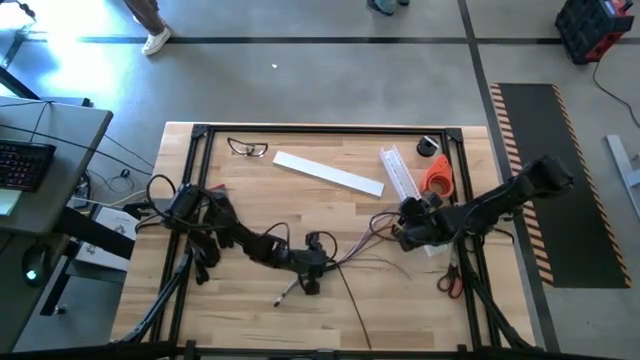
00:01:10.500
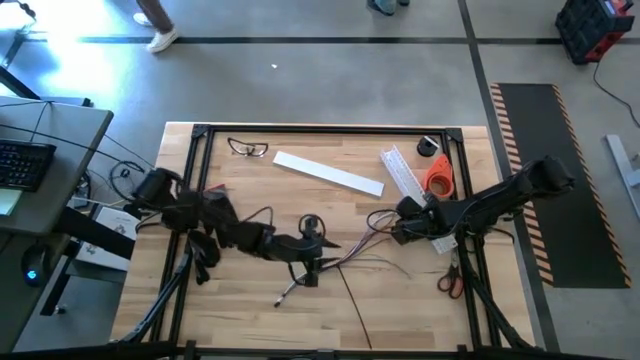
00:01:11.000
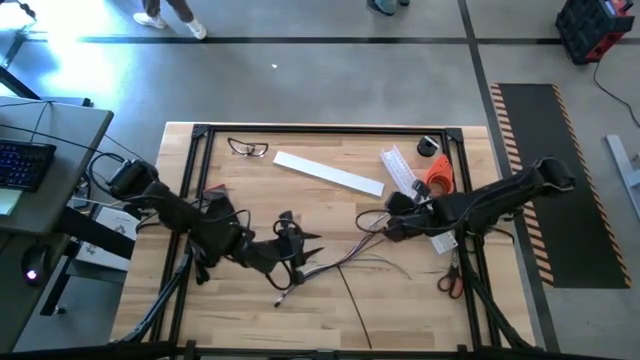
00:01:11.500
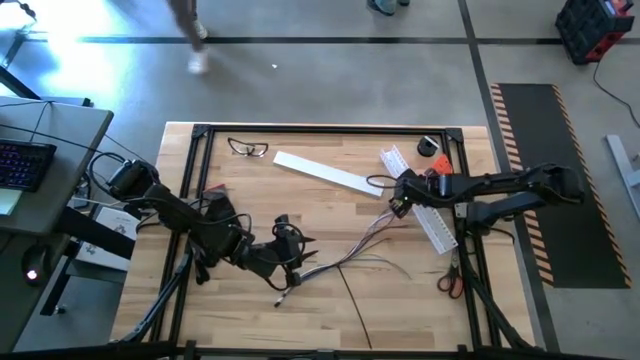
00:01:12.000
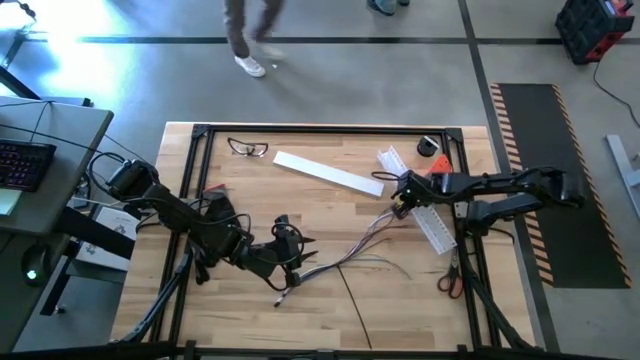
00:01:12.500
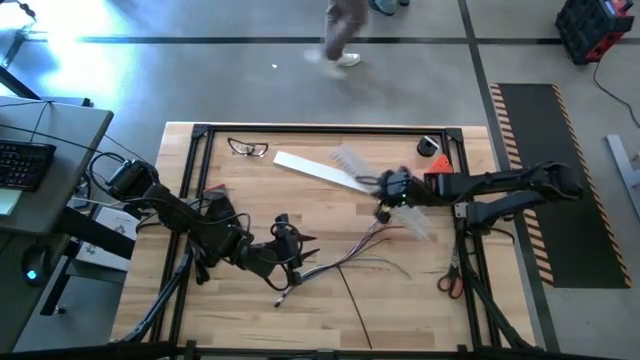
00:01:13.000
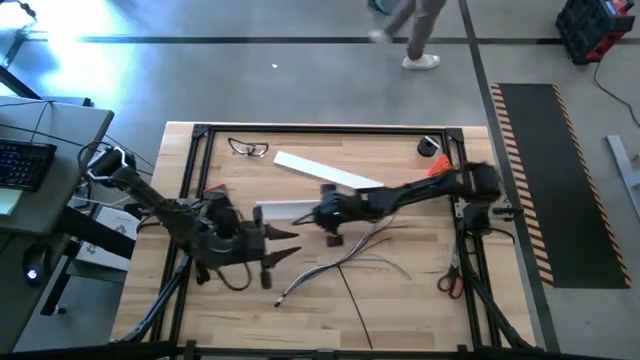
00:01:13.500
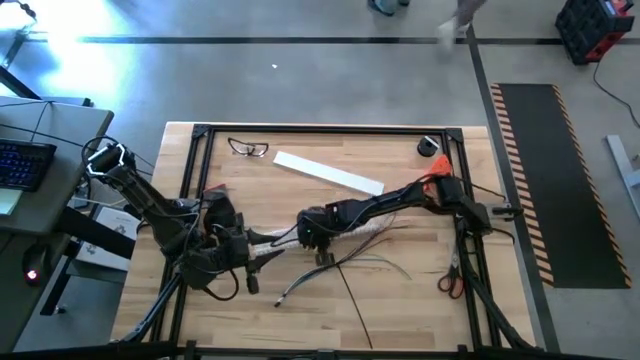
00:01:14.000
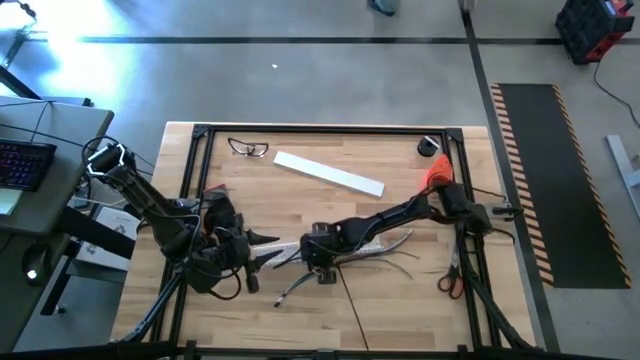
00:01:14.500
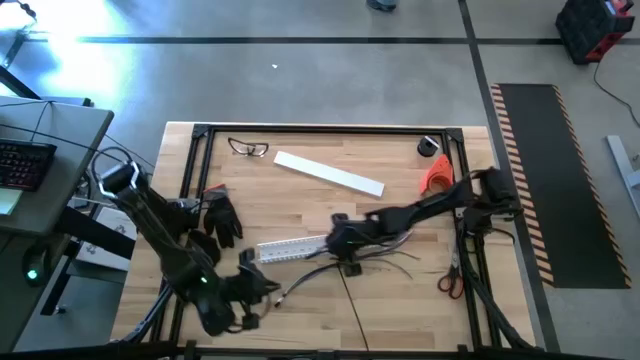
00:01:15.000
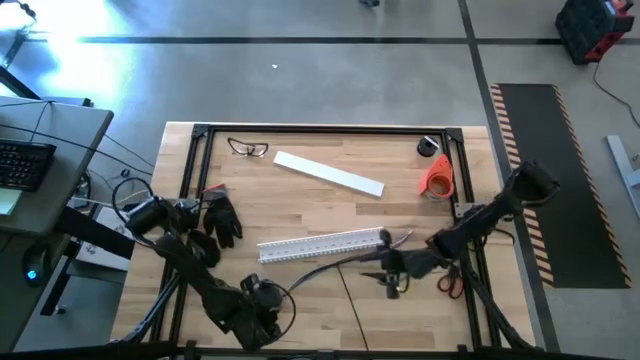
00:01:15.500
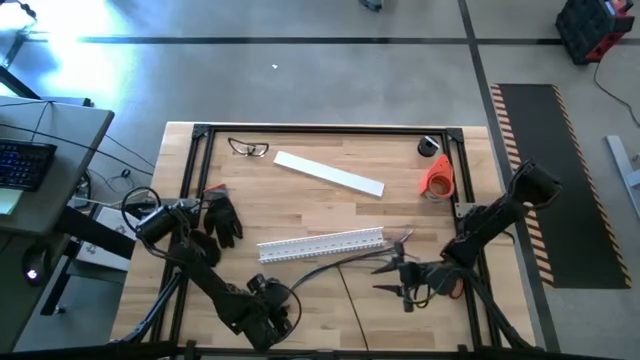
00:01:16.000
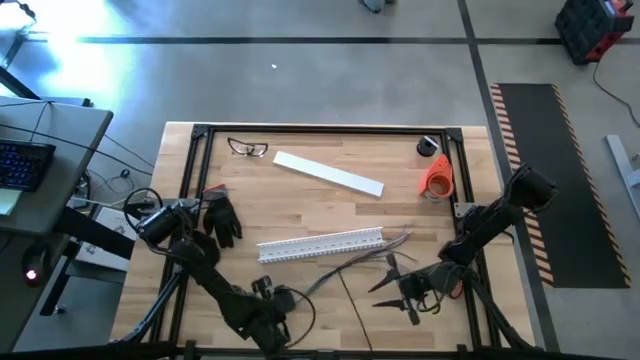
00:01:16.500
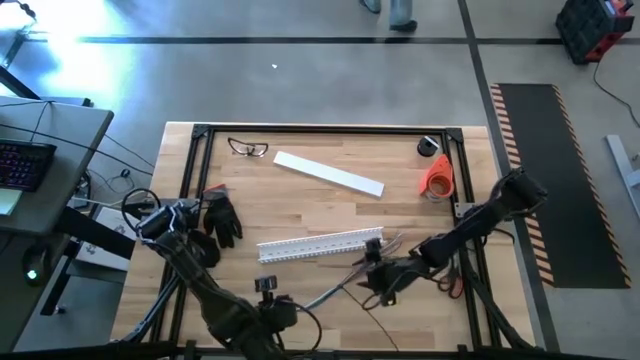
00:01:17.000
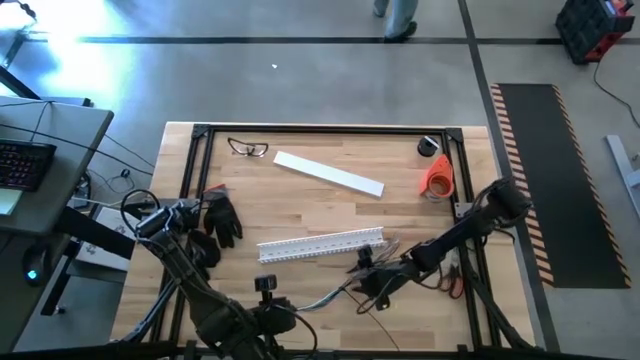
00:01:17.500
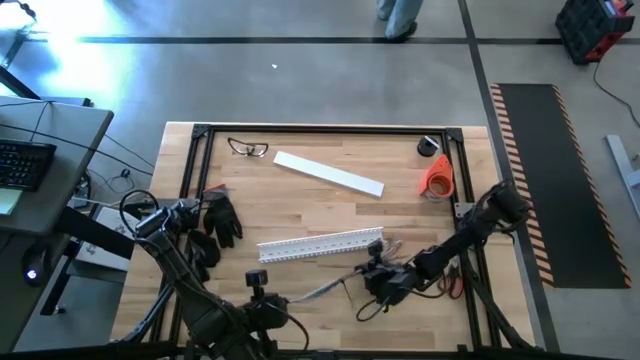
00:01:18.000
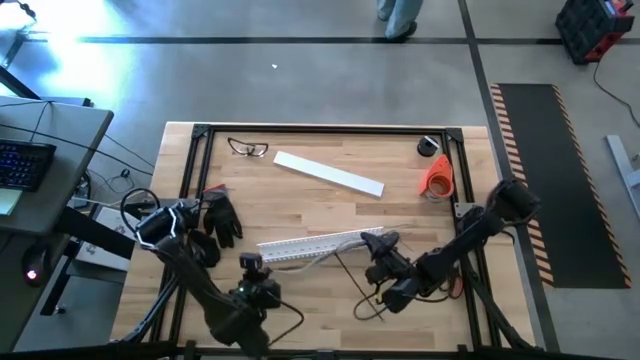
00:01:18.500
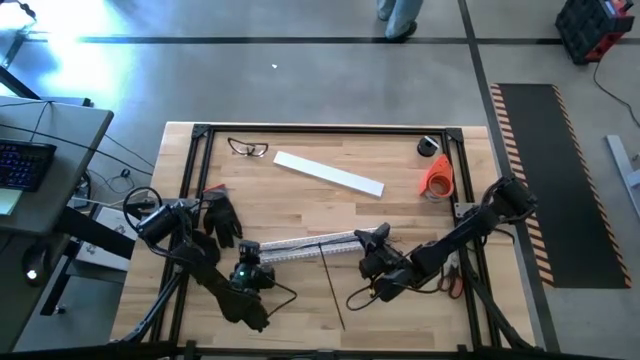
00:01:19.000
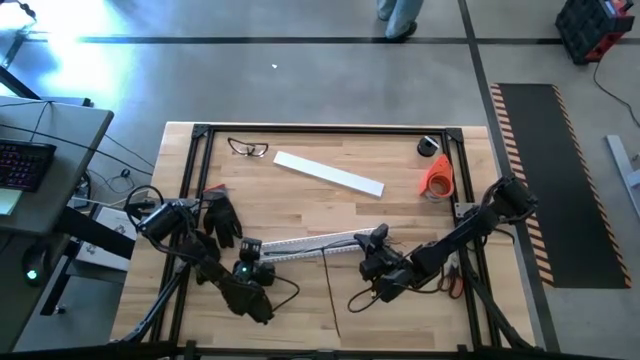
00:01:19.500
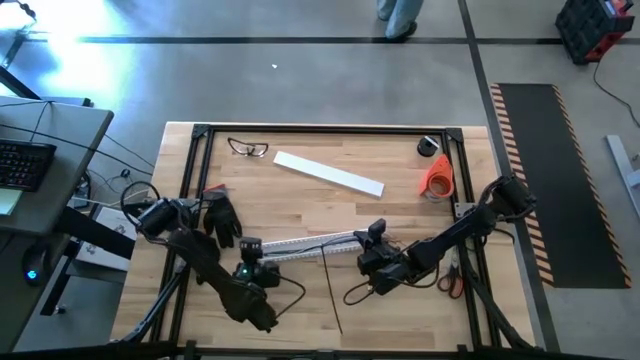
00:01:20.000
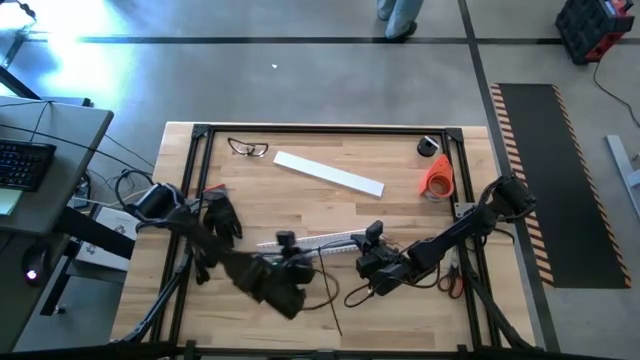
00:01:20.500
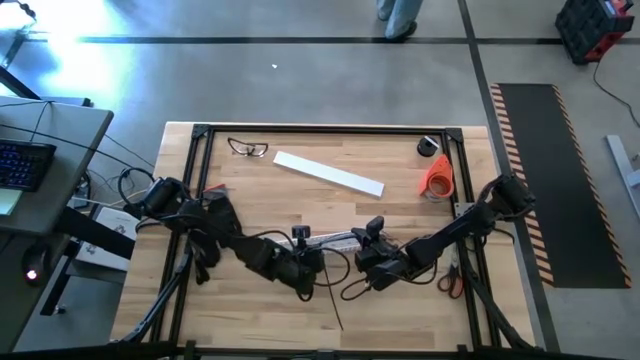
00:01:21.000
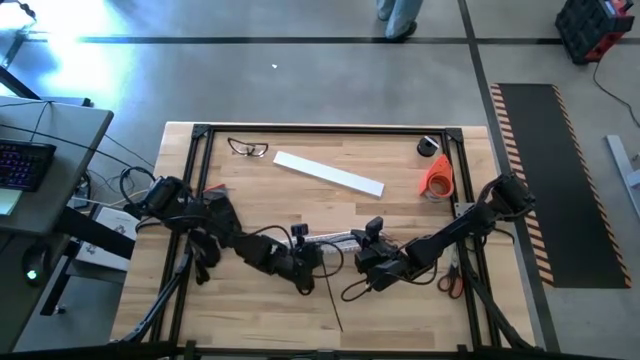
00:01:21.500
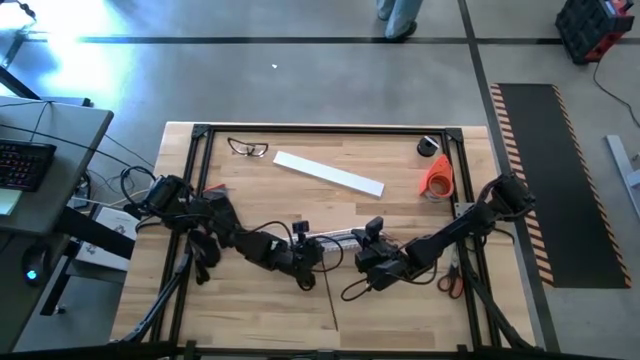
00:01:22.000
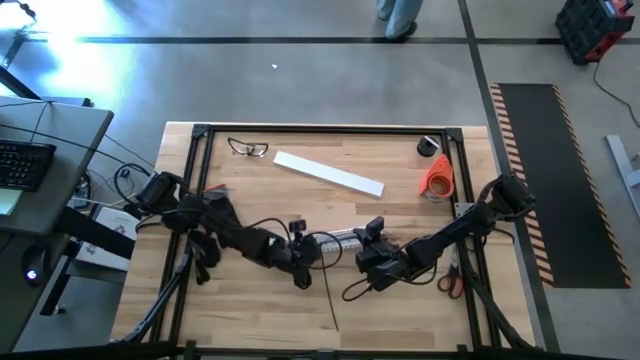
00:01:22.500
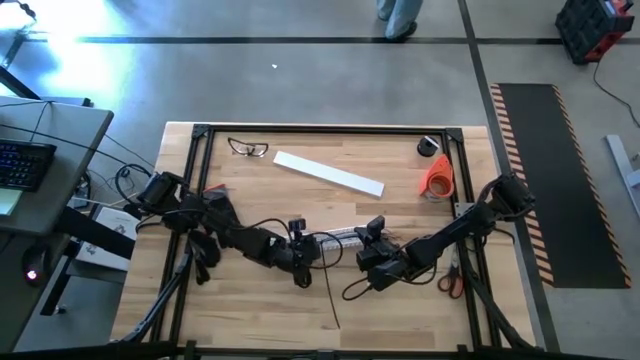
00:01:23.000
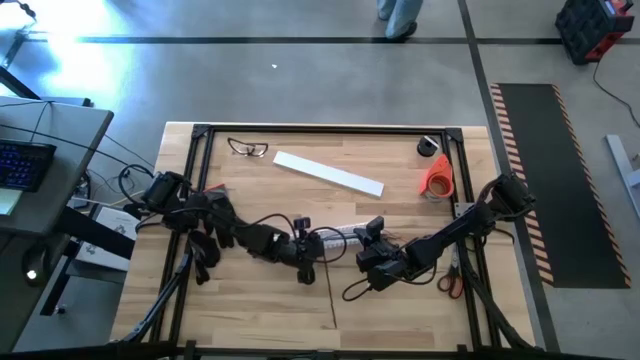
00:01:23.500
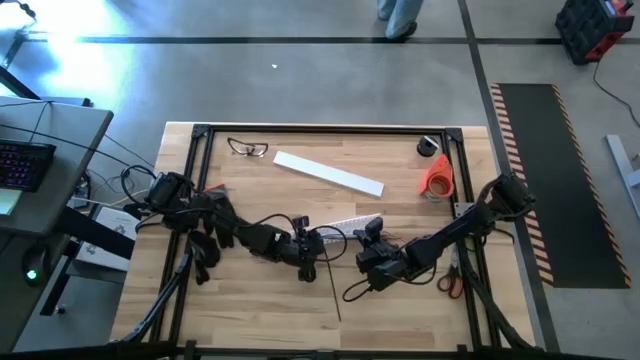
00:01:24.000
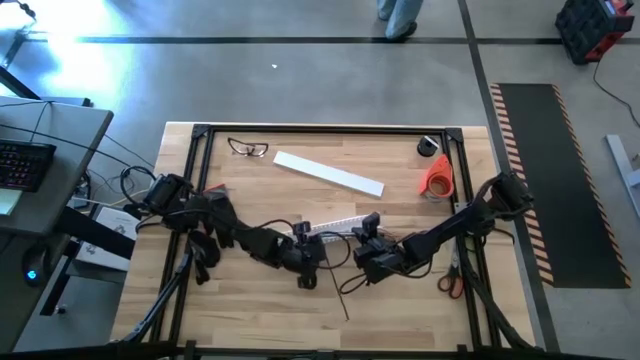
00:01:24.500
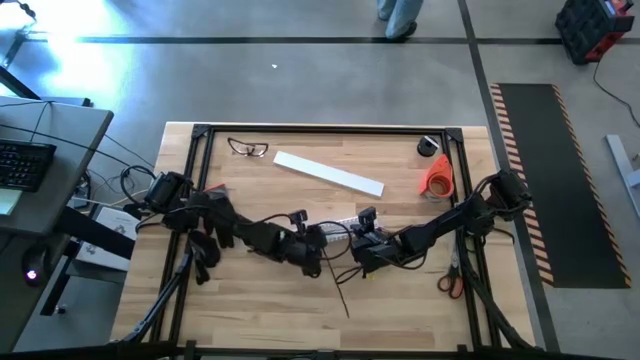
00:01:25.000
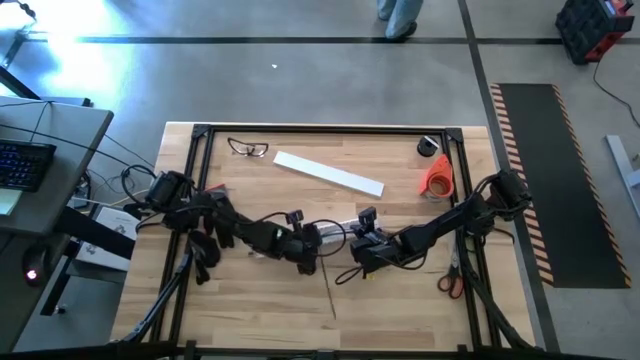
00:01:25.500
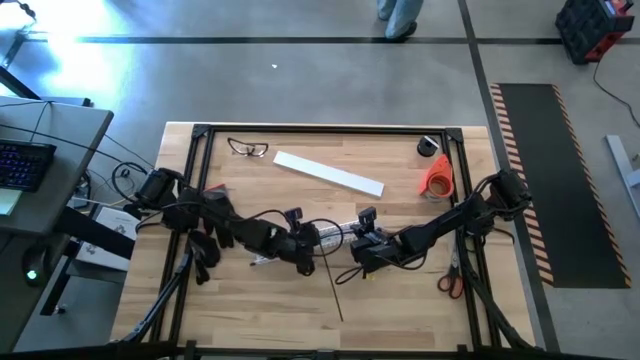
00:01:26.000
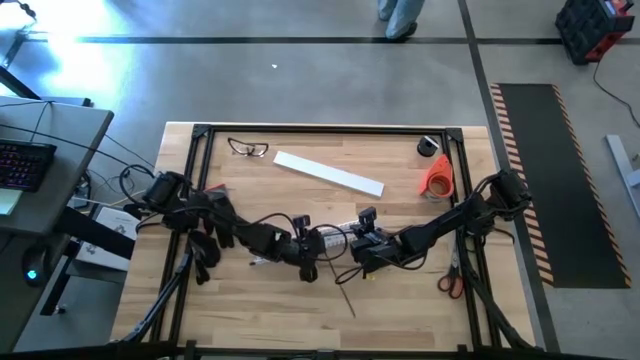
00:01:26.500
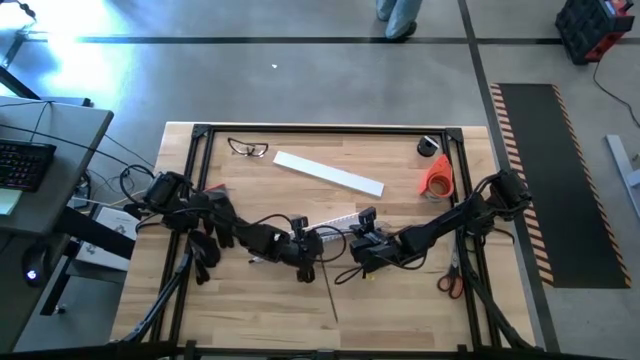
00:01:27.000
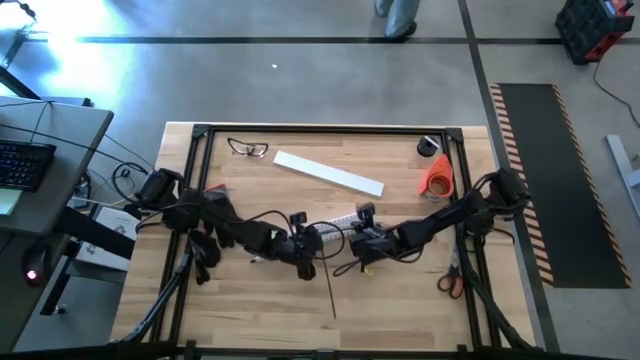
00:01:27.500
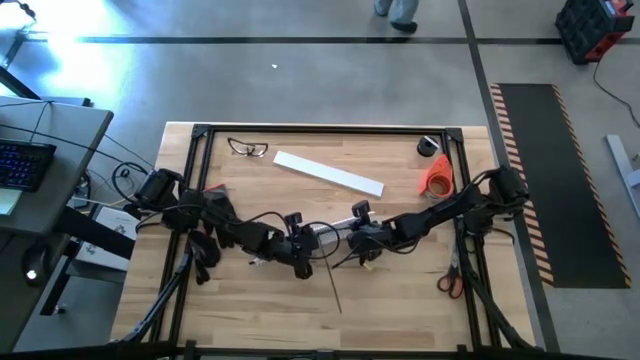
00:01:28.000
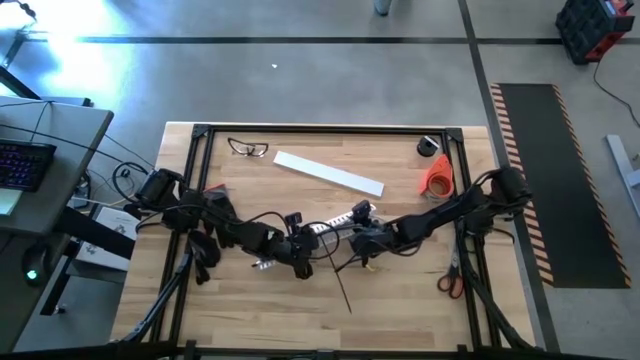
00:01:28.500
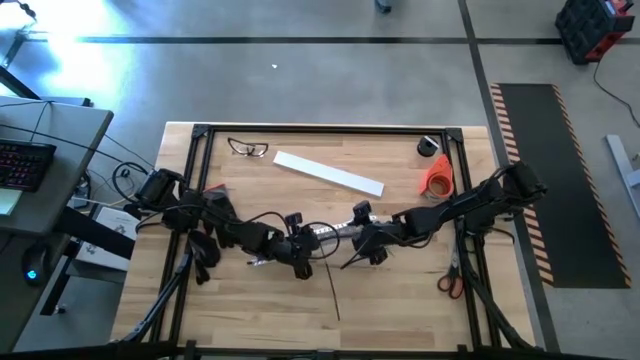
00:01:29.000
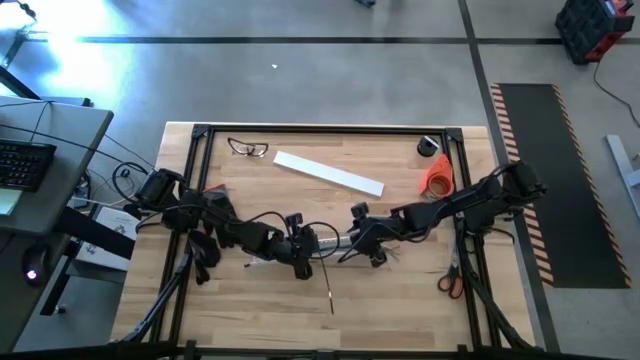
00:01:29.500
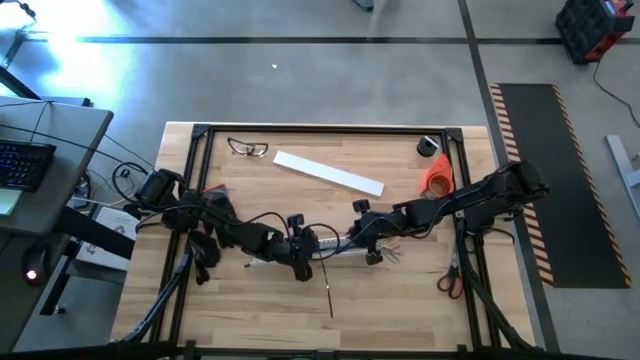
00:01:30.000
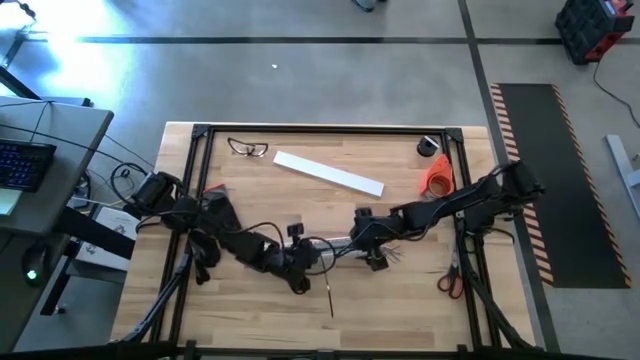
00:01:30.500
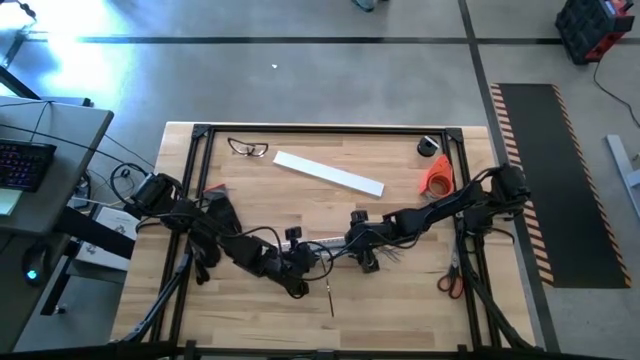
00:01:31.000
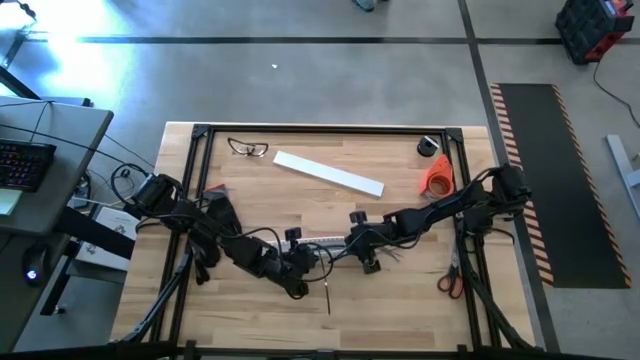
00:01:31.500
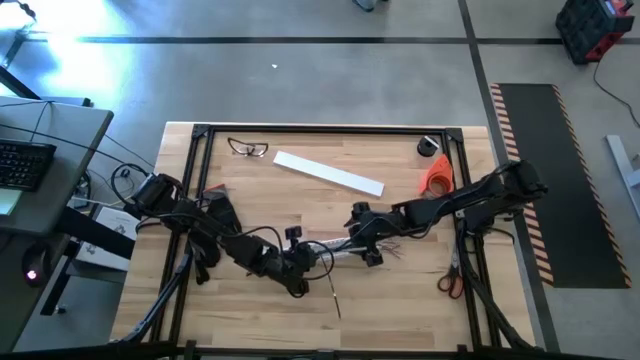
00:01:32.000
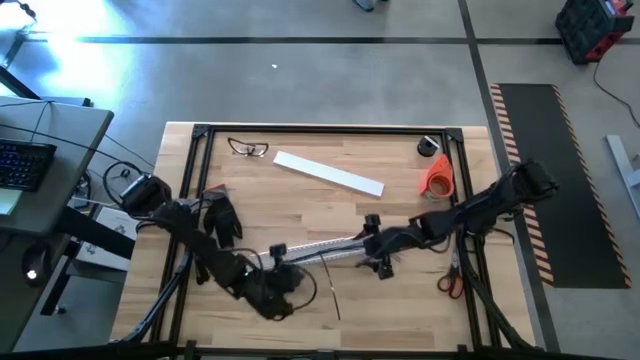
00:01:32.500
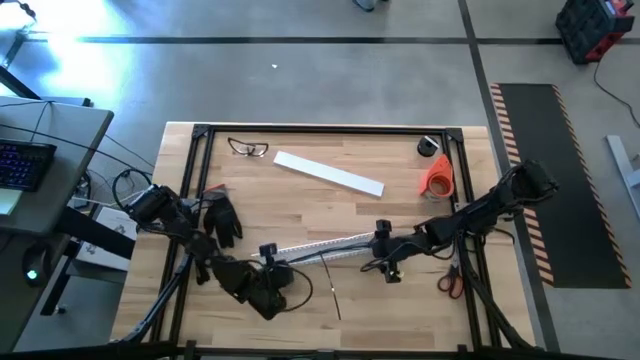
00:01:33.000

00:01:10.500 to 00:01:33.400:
Task: Ziptie cables
Put the ziptied cables into the the white cable duct
